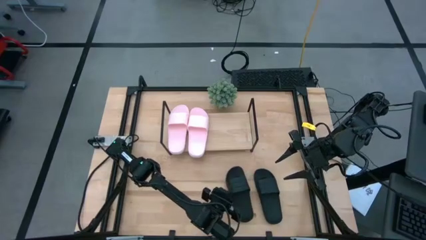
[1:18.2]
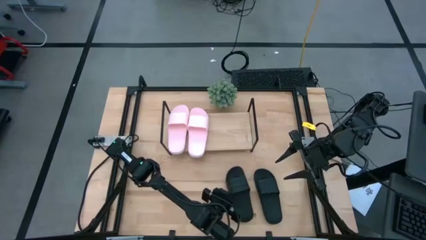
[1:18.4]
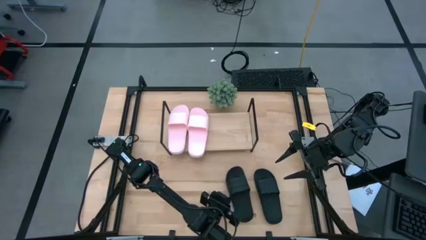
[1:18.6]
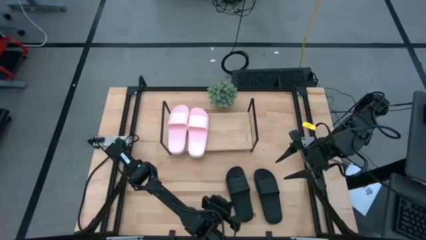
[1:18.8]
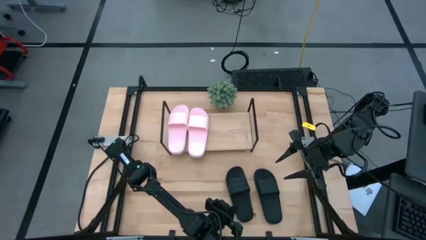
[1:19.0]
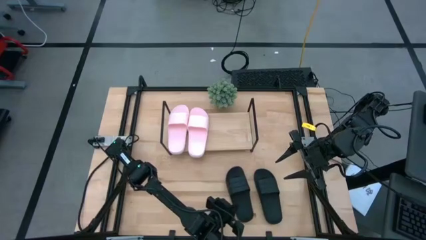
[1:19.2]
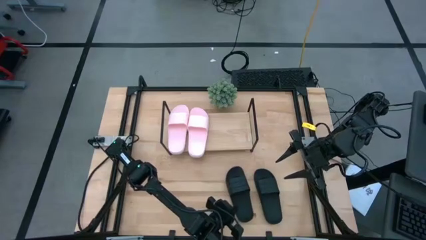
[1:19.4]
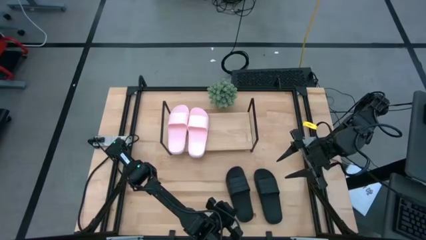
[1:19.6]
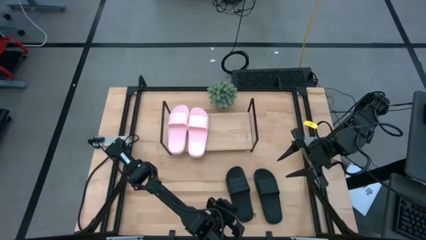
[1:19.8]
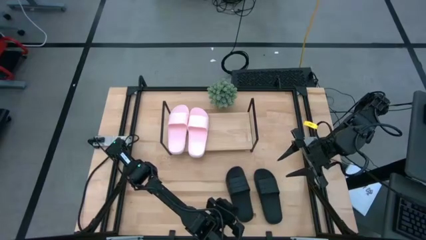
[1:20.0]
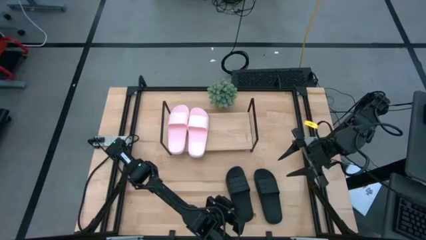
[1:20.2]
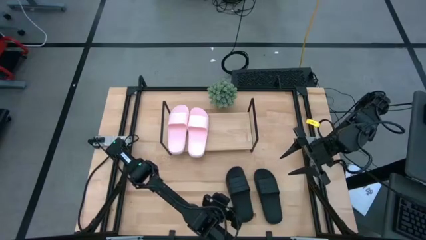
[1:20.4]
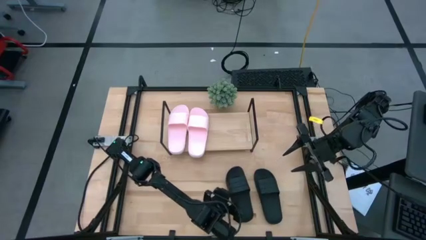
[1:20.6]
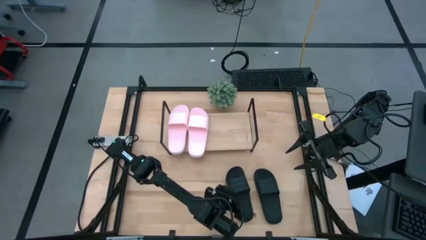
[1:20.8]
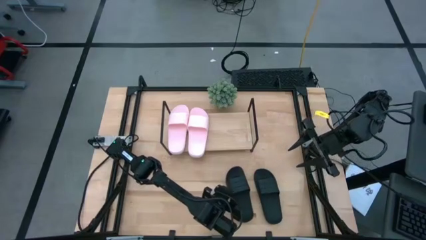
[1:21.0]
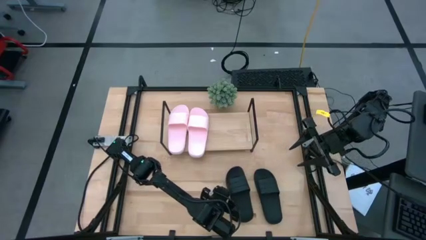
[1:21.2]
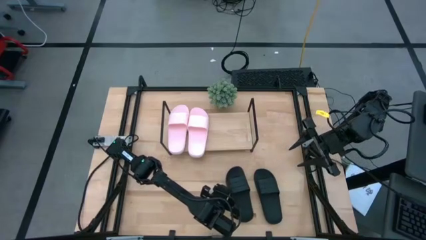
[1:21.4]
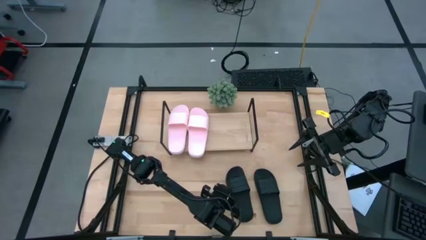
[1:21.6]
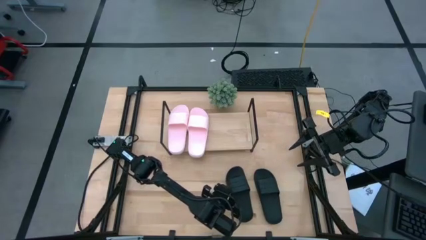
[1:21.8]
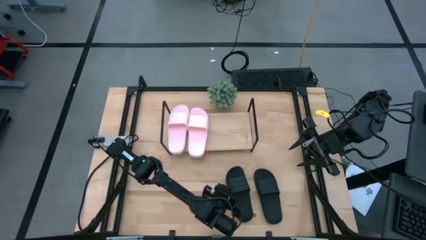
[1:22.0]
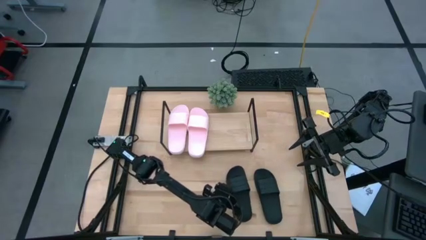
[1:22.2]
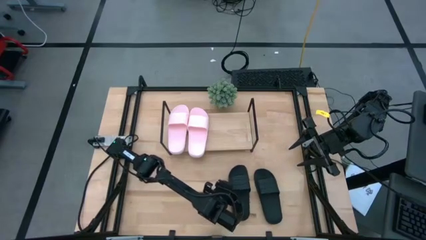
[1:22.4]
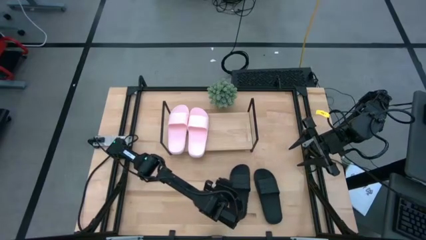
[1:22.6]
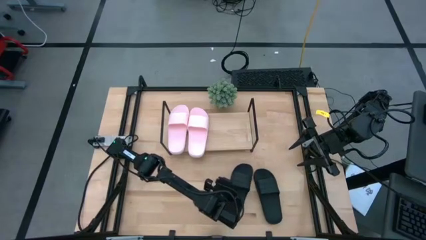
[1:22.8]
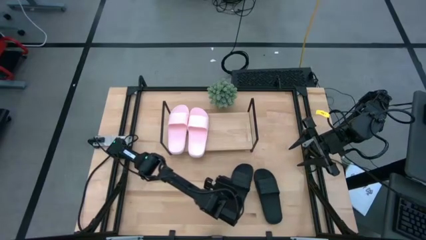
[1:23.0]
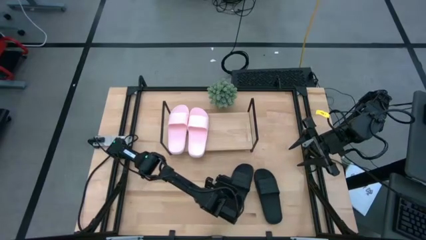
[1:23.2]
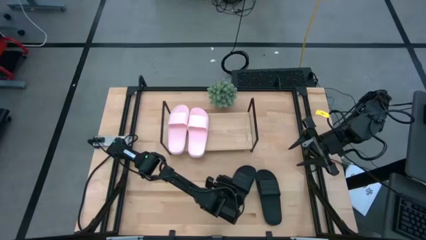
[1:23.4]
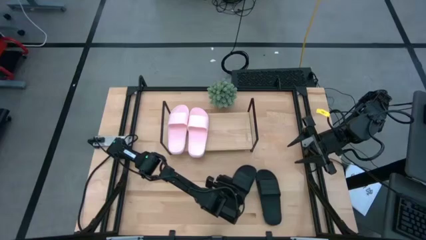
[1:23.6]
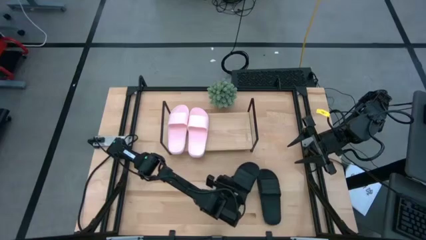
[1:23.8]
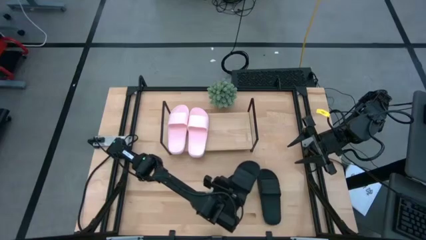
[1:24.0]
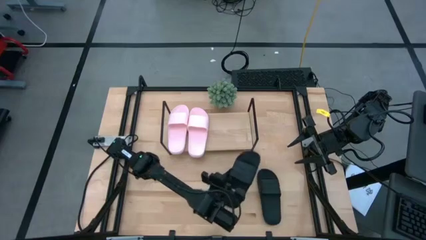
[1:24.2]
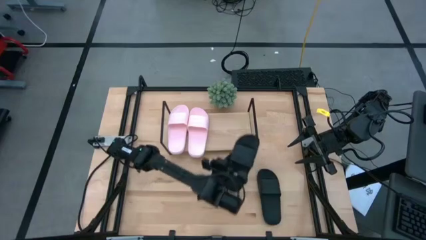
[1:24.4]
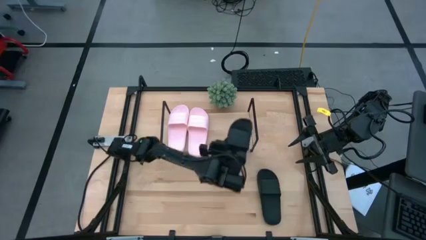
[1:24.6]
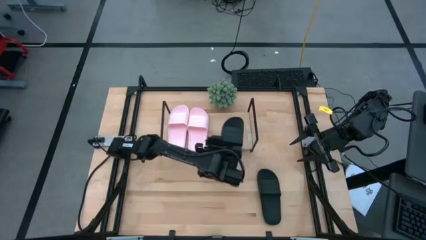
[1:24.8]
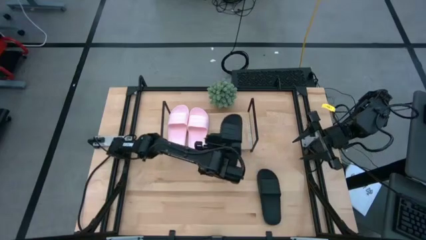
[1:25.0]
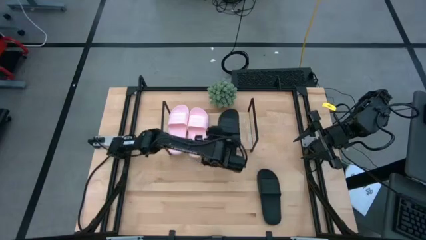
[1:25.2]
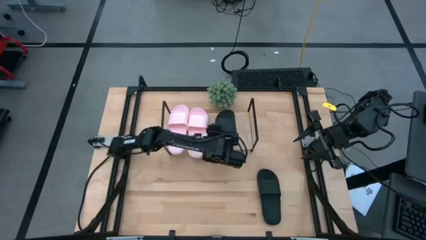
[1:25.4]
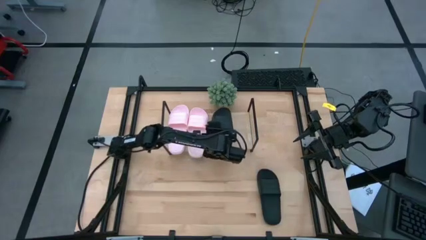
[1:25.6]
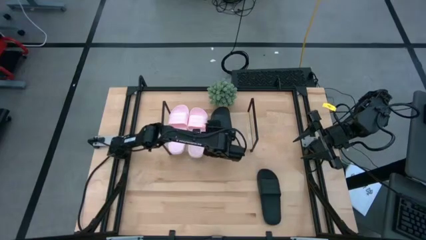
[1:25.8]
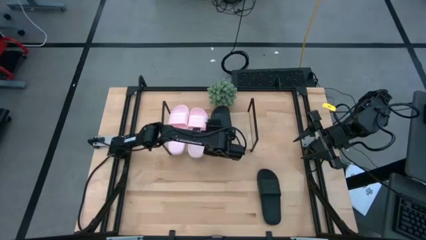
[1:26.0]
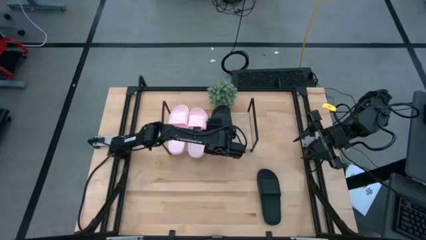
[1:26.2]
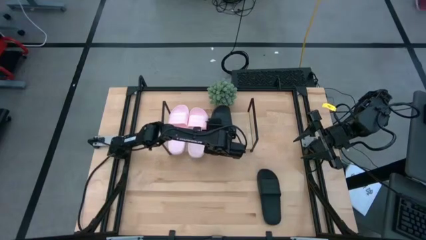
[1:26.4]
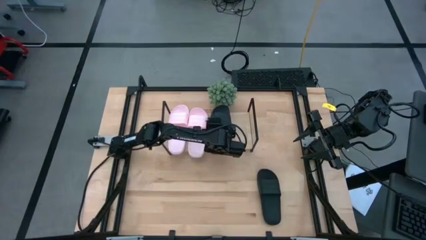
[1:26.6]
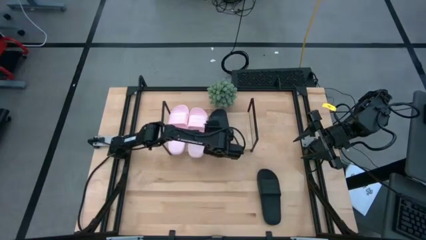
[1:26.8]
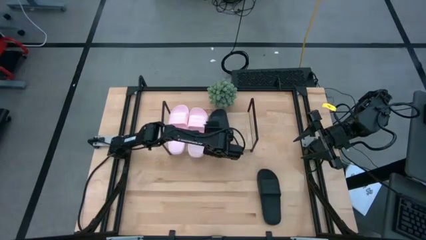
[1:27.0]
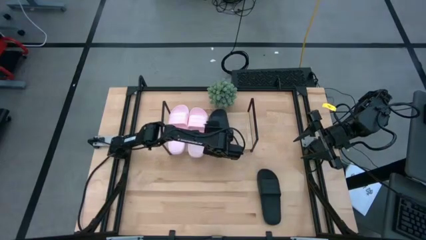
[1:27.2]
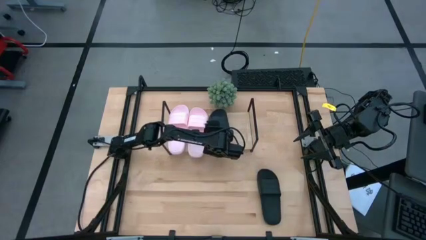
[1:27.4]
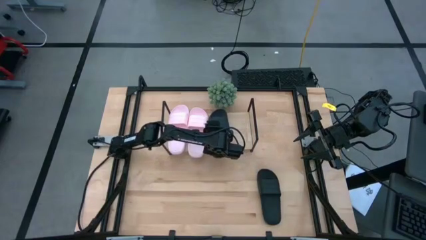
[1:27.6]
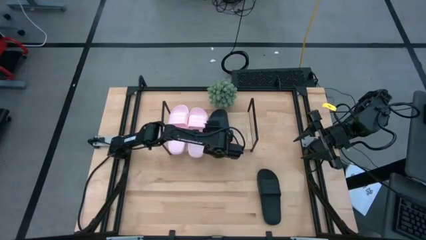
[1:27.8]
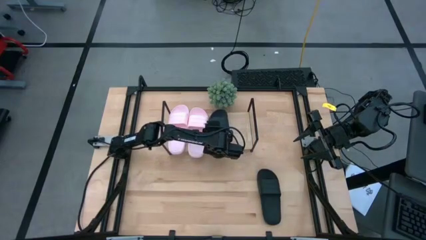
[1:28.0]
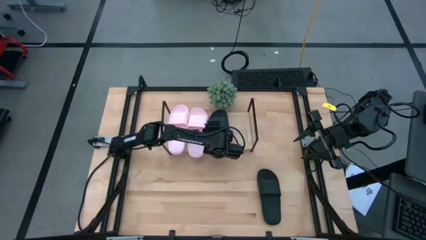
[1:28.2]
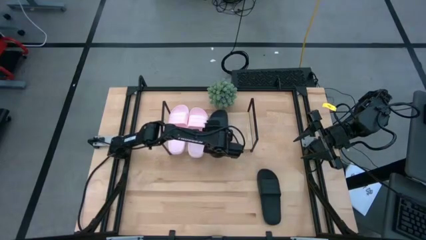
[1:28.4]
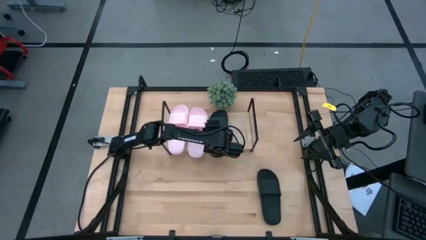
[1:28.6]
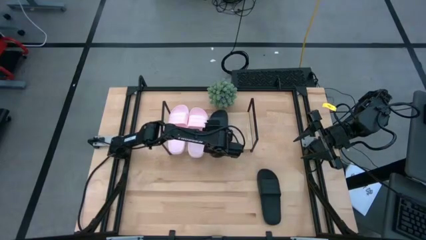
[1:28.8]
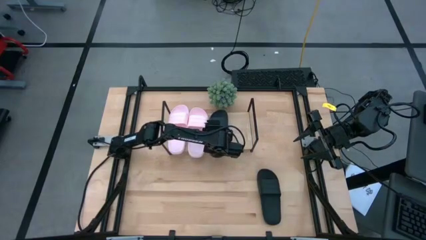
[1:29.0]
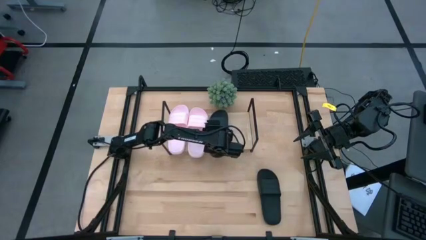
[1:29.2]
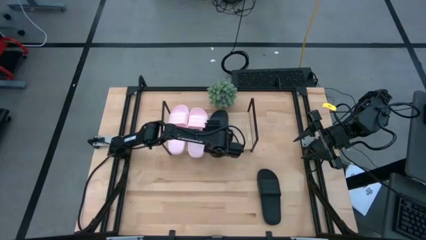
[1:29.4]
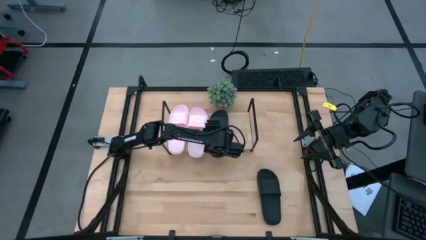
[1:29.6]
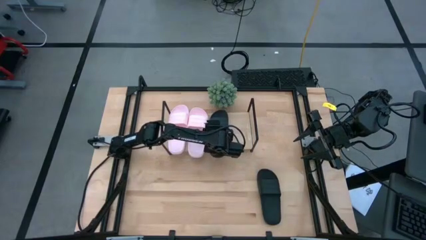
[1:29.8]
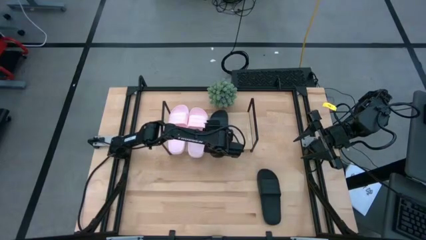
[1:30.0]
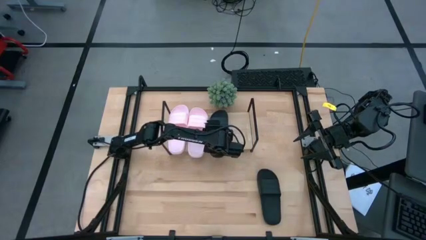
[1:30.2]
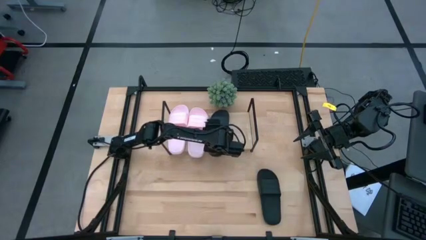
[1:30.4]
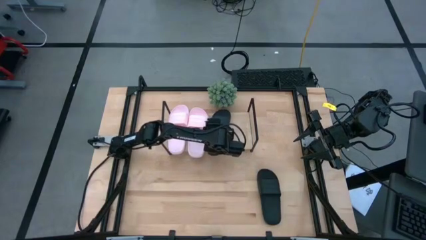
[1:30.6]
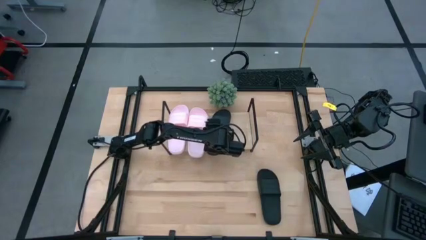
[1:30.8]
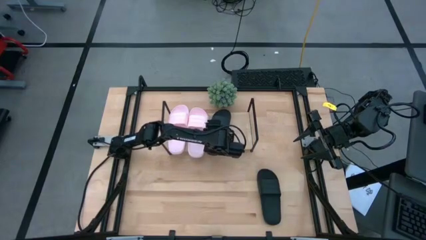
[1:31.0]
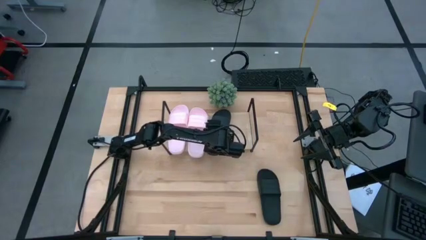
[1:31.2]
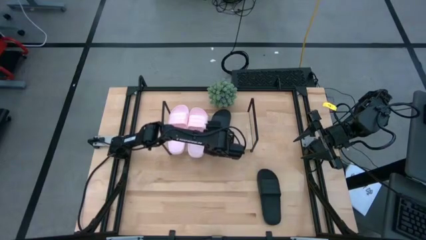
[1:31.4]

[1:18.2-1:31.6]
Task: Pick and place slides into the shelf
Put the black slide on the shelf
